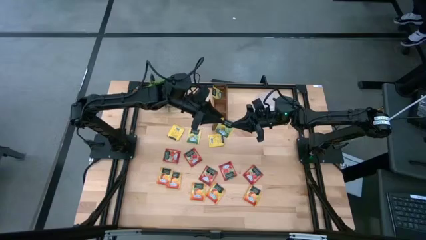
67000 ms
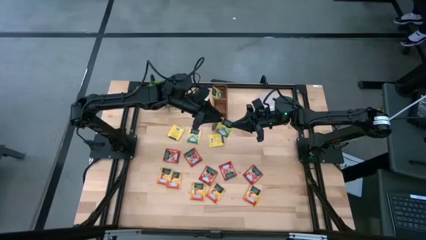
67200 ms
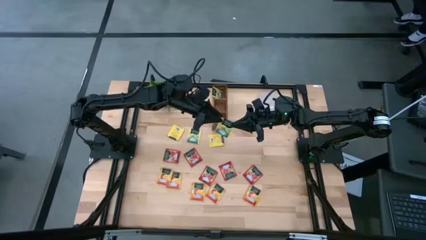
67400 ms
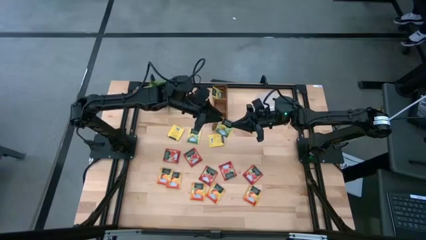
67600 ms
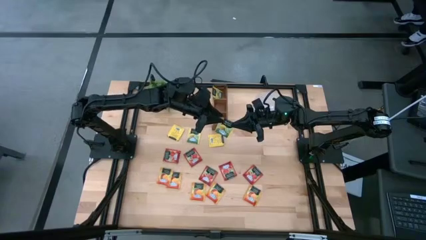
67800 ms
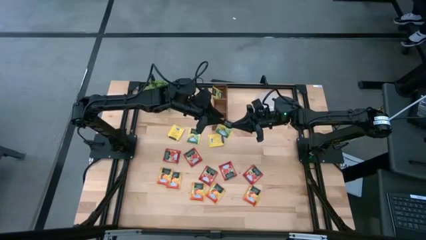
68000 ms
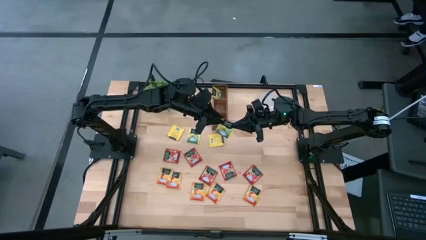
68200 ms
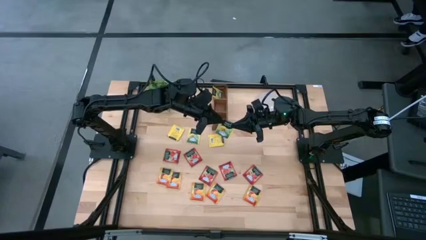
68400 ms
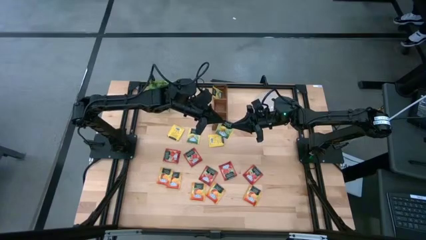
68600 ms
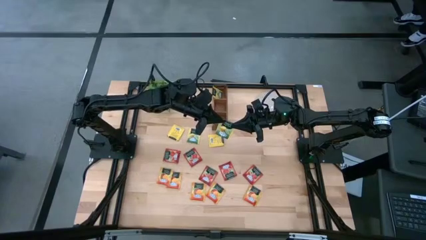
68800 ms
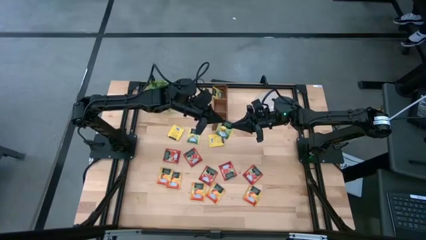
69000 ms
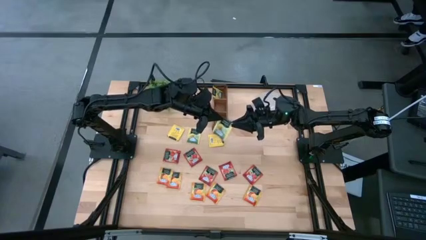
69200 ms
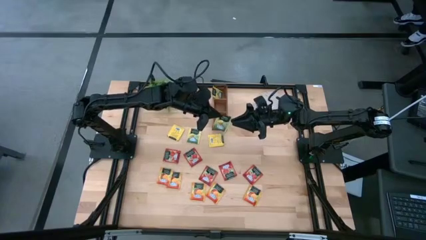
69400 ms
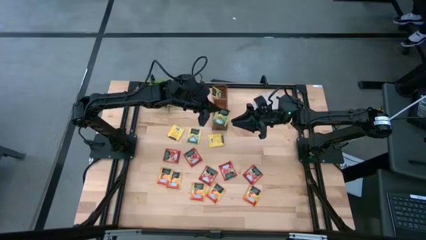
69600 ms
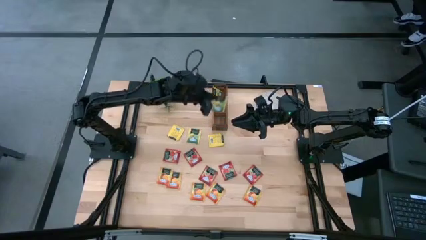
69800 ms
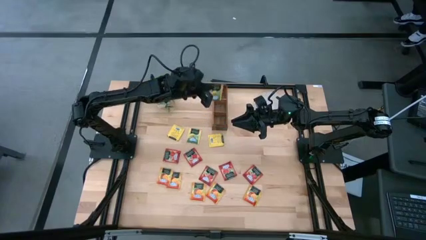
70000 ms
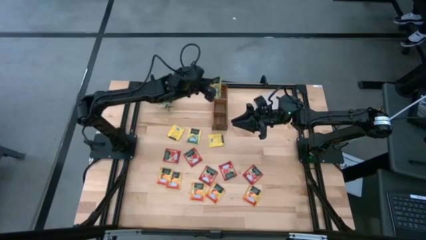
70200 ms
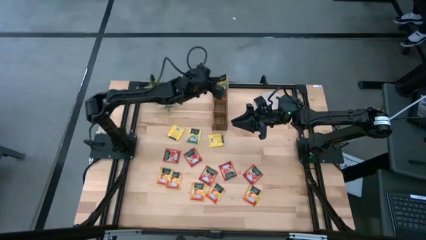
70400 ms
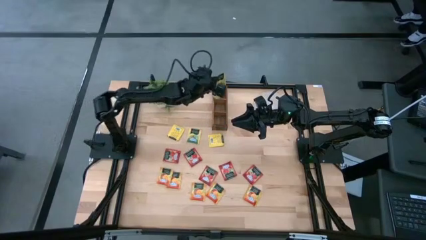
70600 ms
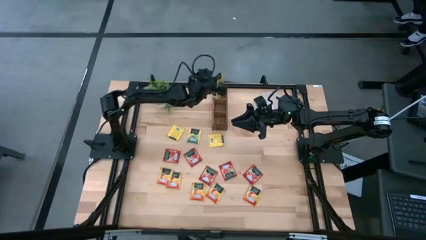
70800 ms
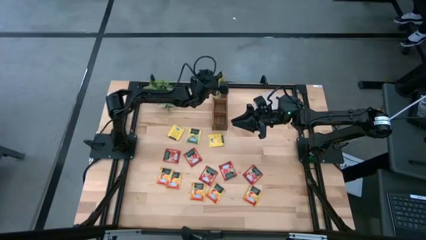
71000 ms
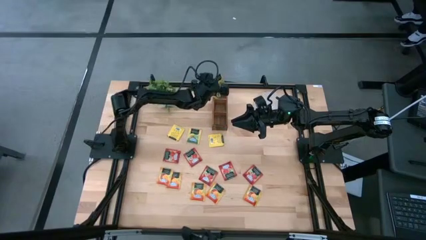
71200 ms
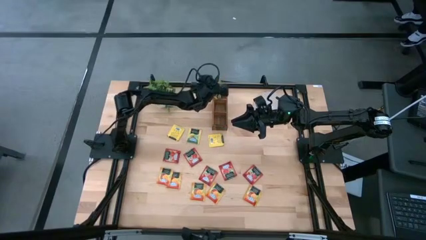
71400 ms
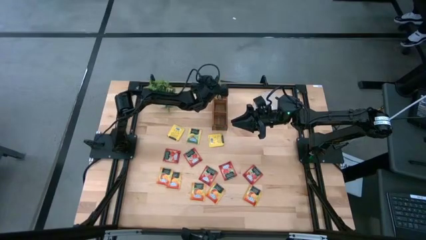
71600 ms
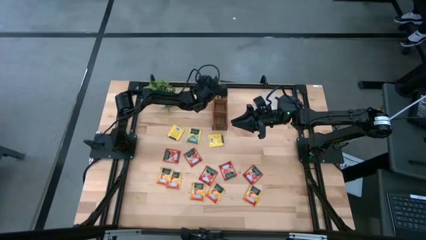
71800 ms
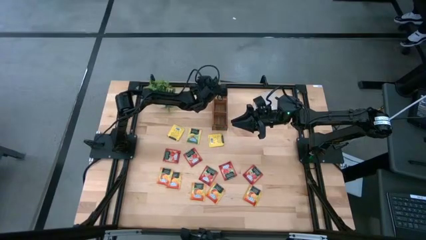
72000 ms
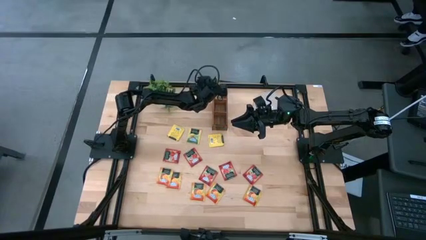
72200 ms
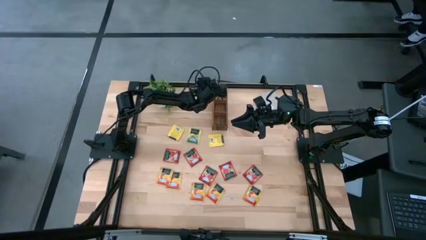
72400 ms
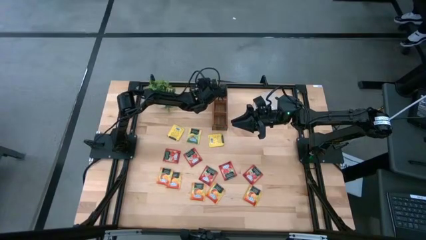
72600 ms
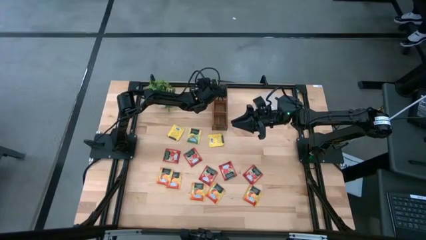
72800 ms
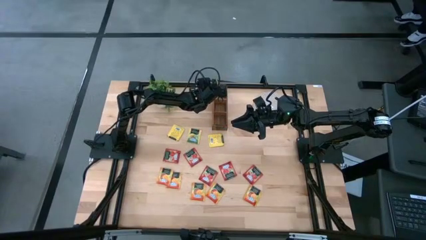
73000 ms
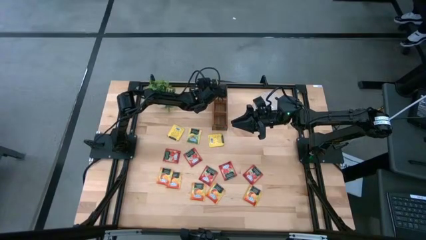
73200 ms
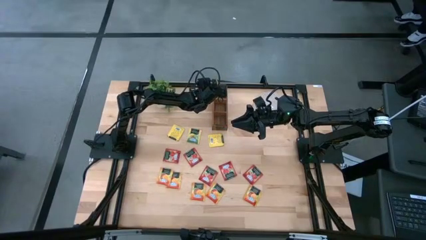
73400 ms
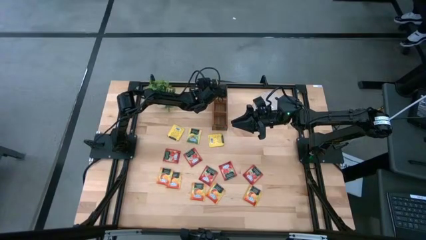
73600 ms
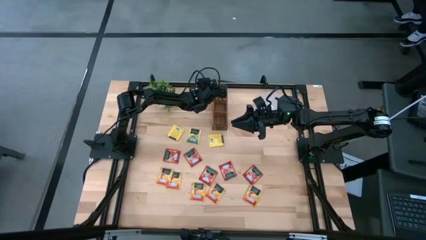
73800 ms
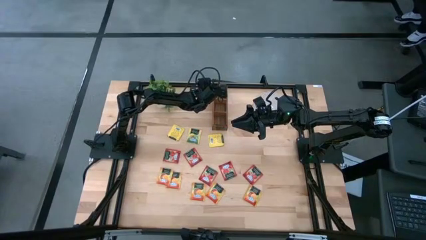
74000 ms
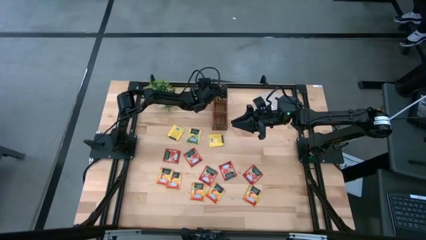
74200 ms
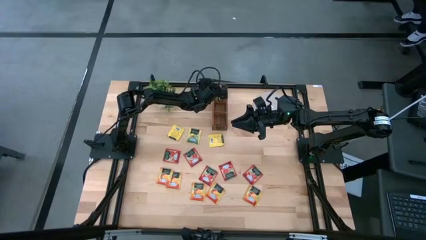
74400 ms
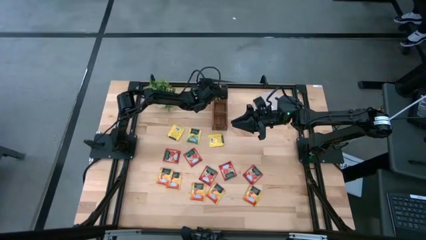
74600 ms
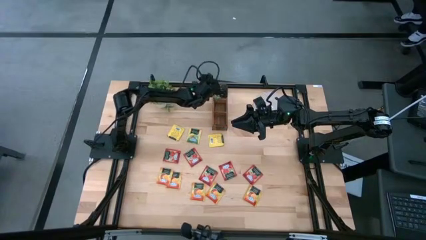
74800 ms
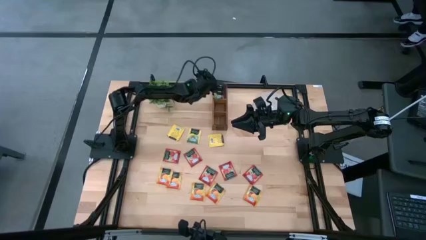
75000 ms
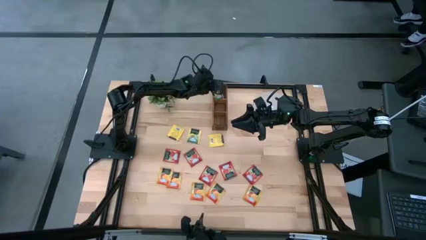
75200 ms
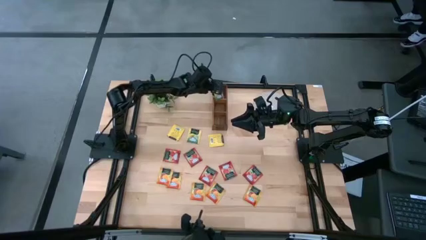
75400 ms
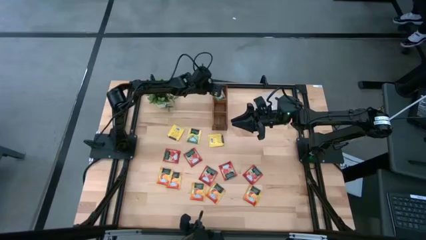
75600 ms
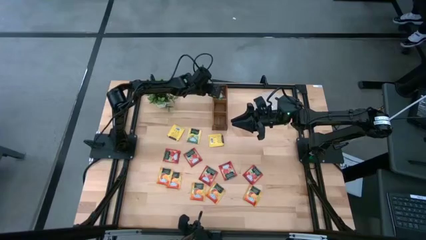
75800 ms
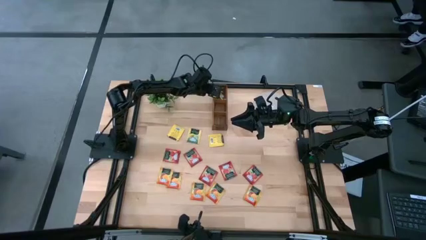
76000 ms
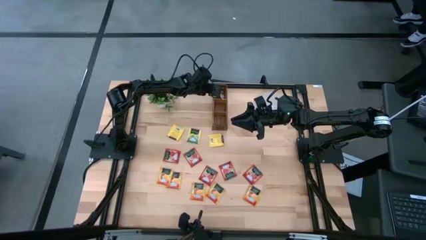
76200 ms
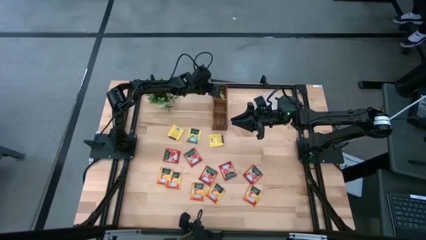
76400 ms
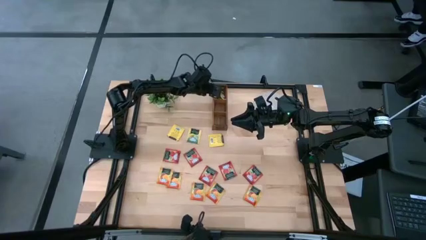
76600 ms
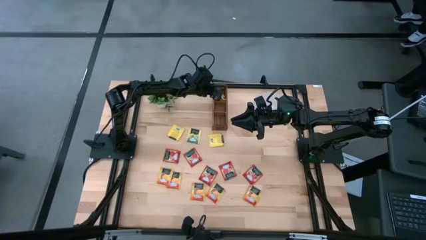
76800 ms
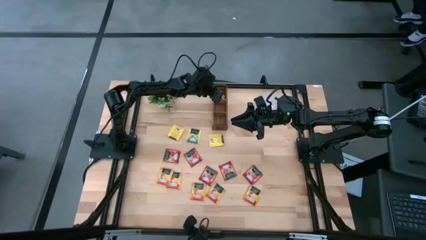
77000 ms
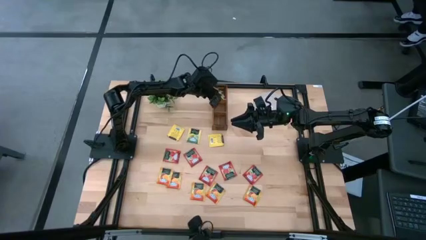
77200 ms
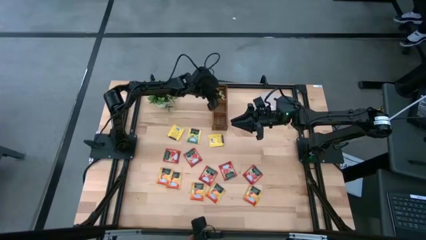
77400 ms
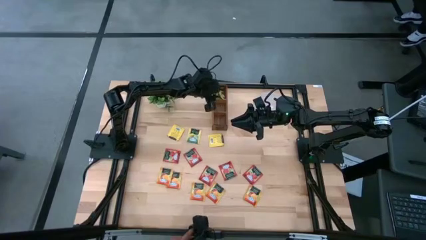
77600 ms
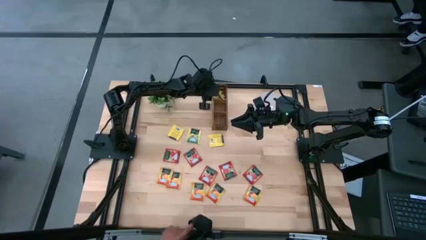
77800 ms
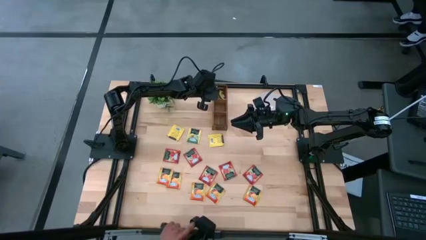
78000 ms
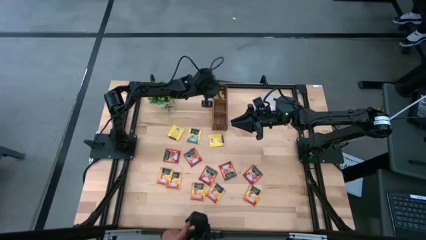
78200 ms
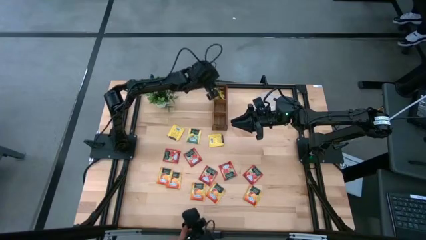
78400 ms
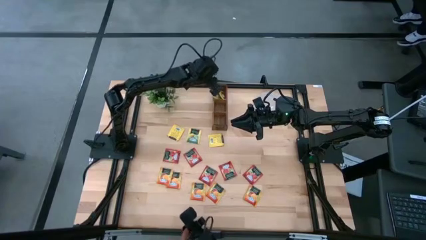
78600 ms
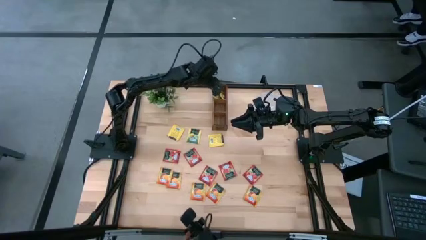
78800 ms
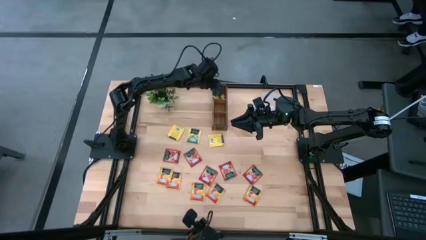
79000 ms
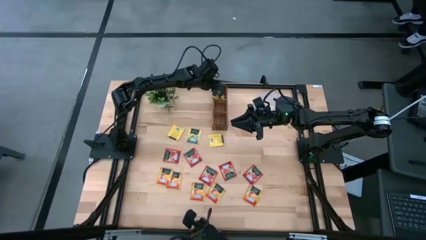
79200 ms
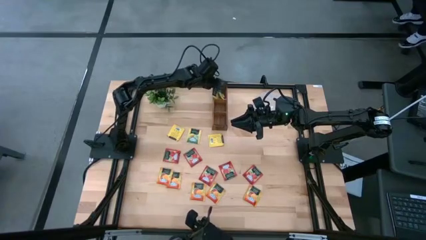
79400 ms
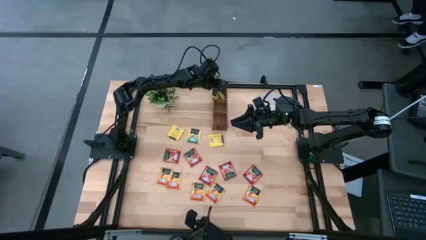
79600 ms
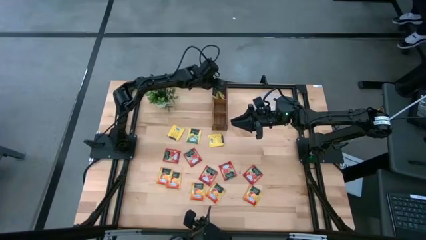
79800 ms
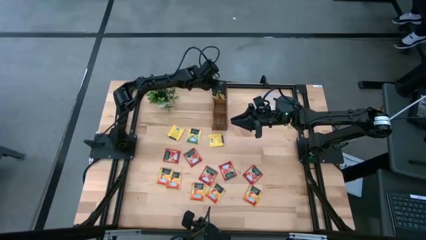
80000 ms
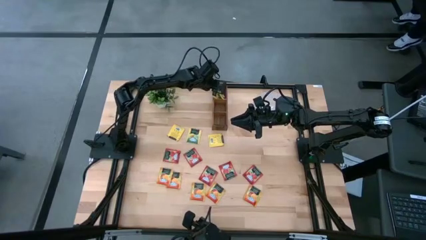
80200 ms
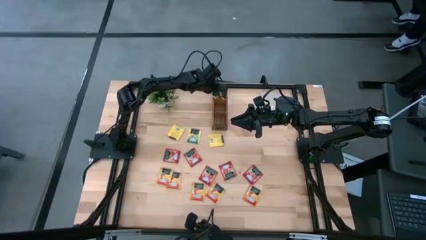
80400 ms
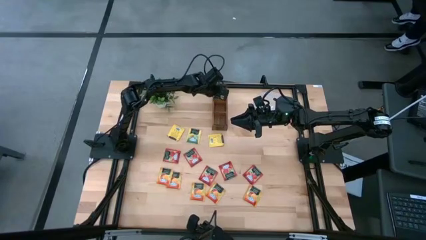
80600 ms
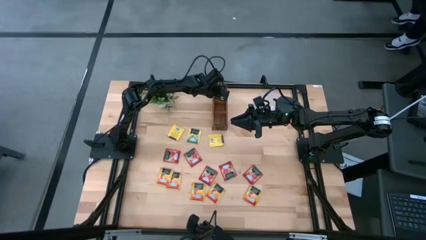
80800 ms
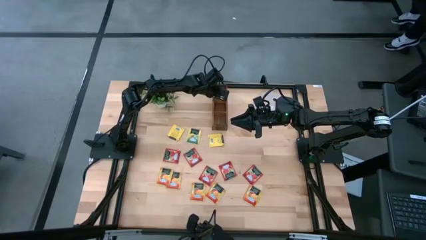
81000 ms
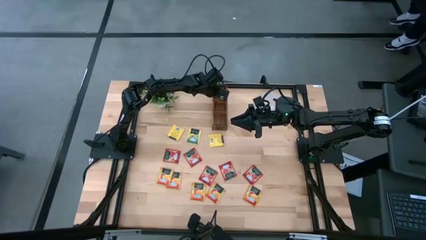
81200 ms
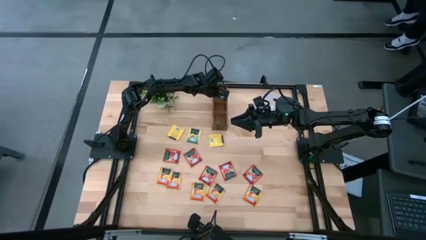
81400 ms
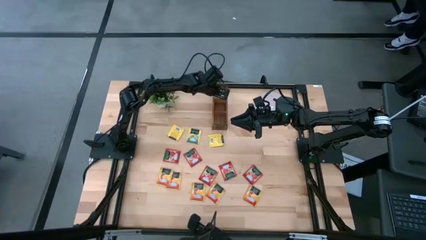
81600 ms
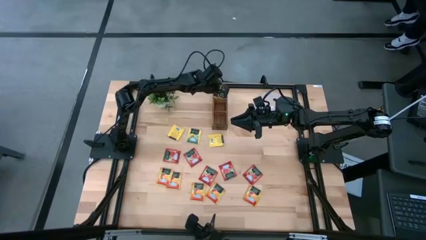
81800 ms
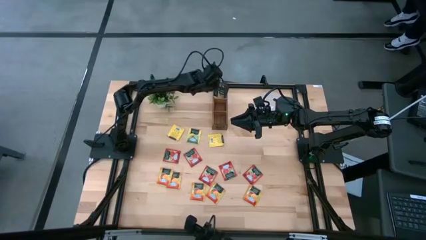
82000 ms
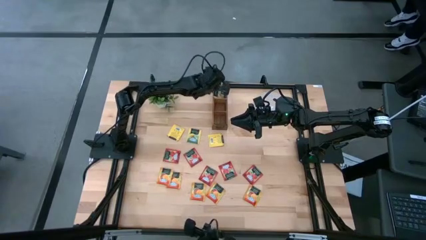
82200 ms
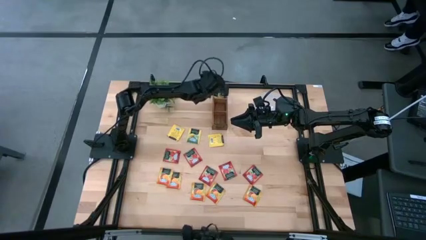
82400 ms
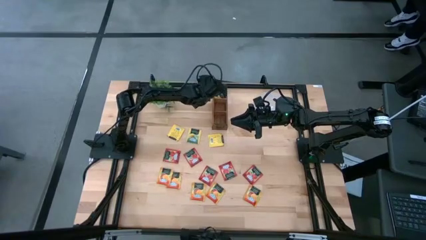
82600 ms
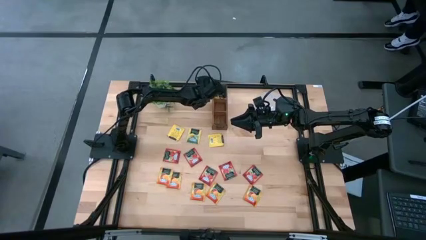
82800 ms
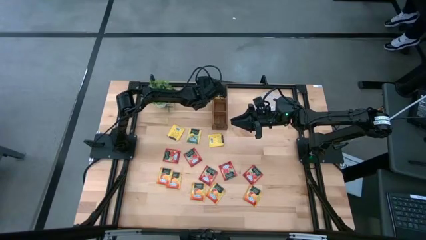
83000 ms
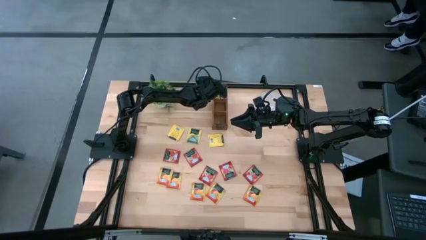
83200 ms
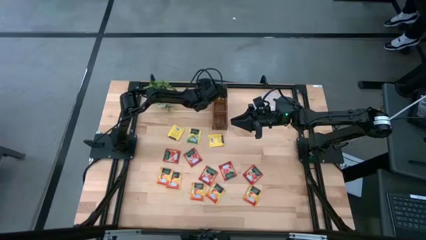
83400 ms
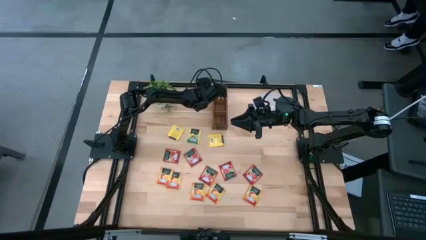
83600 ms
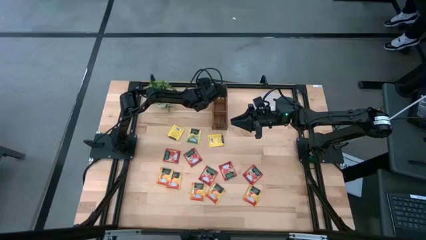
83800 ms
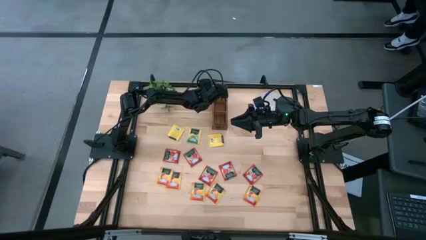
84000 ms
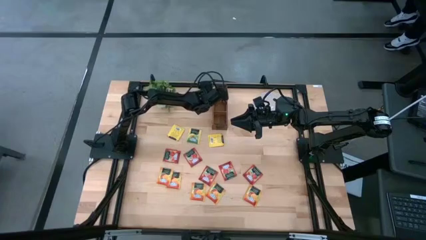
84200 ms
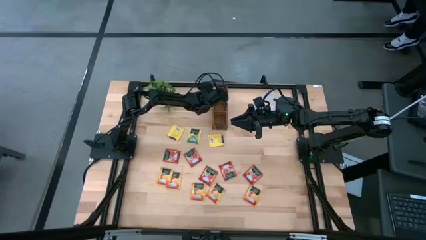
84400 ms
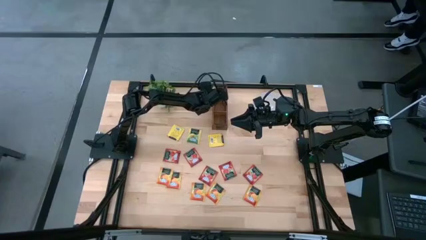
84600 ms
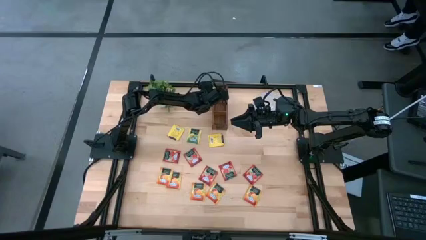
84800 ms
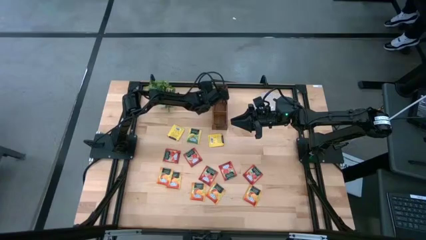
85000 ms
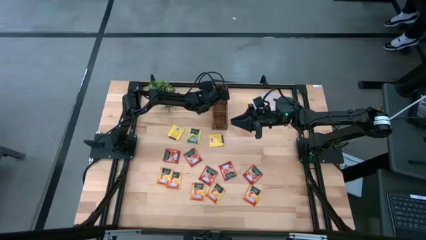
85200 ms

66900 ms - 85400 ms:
Task: Pick & Place Tea
Put the yellow tea bag into the left section of the wooden organizer
